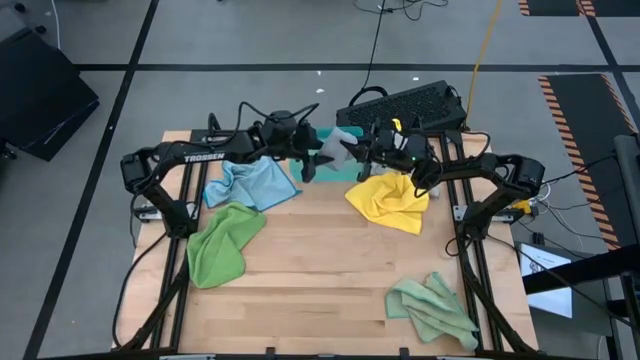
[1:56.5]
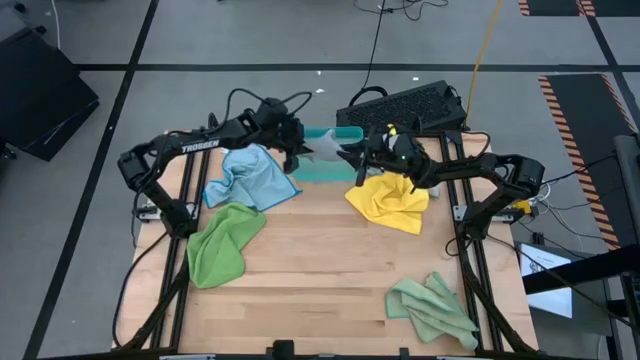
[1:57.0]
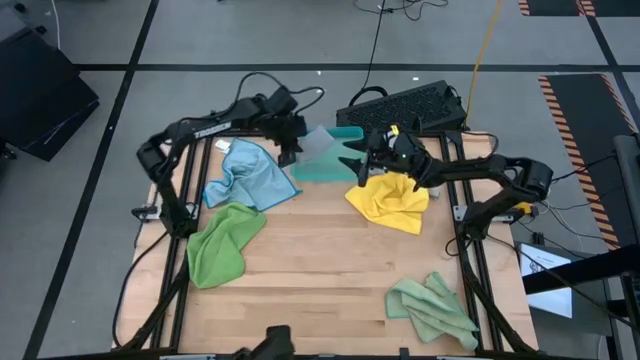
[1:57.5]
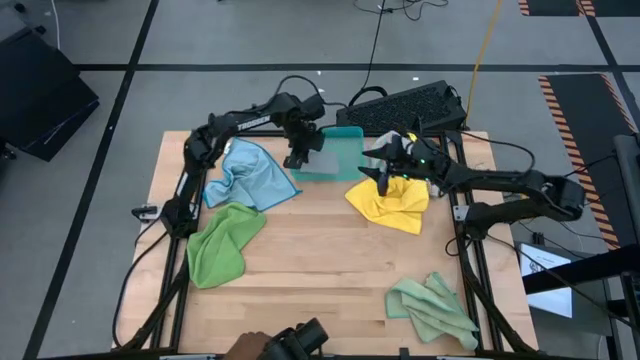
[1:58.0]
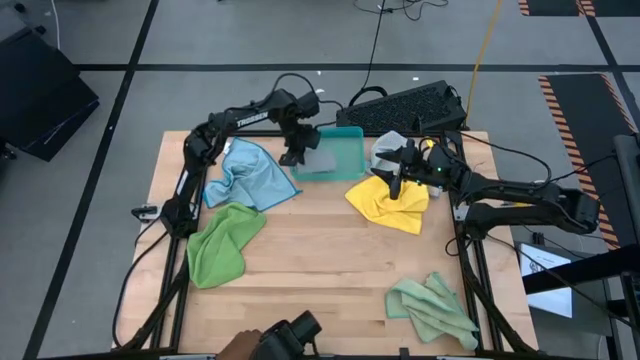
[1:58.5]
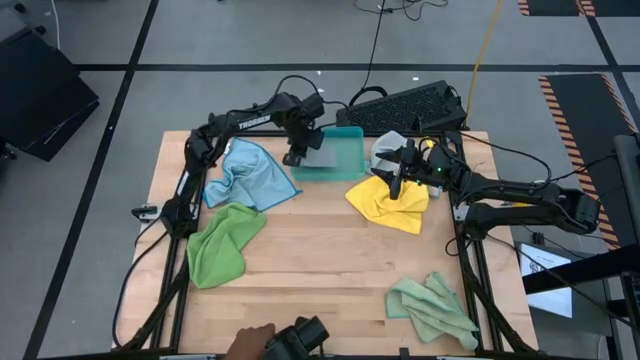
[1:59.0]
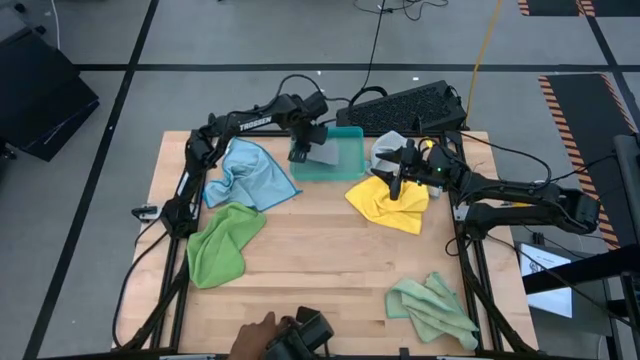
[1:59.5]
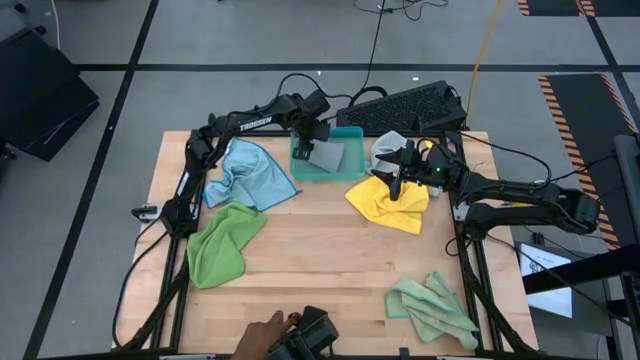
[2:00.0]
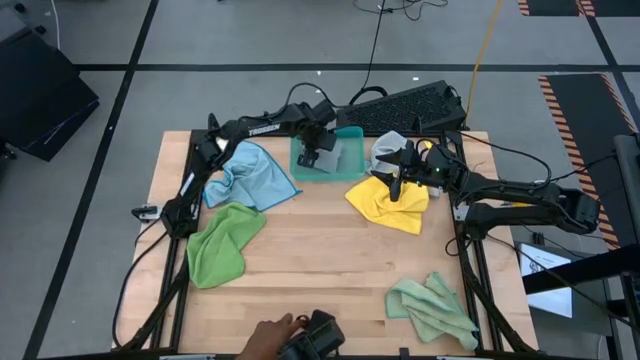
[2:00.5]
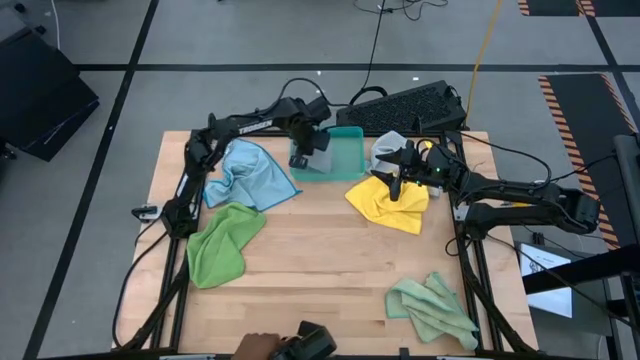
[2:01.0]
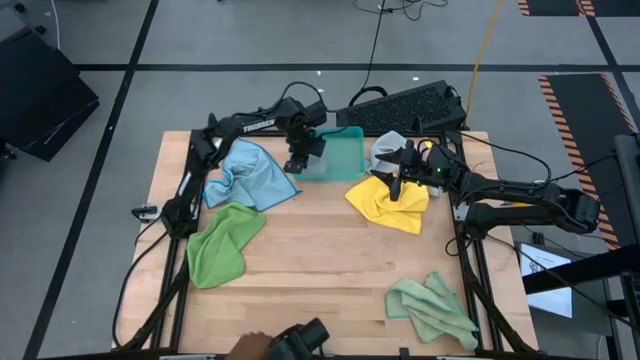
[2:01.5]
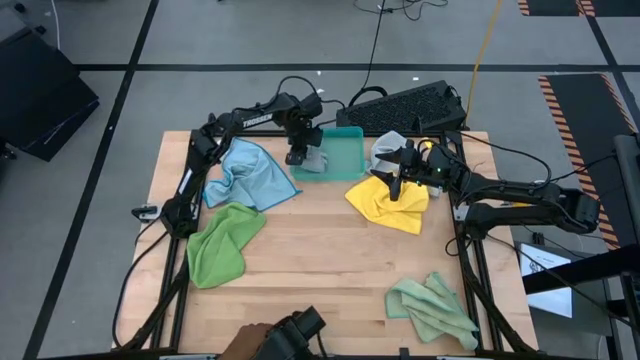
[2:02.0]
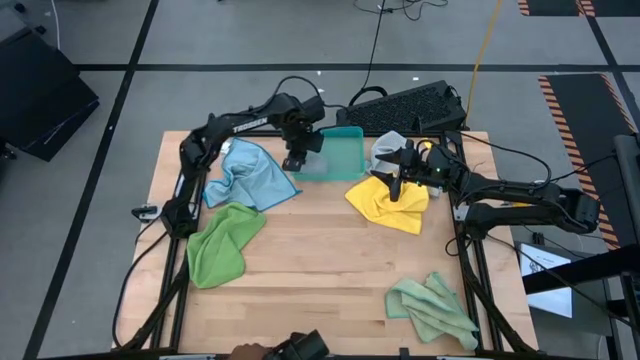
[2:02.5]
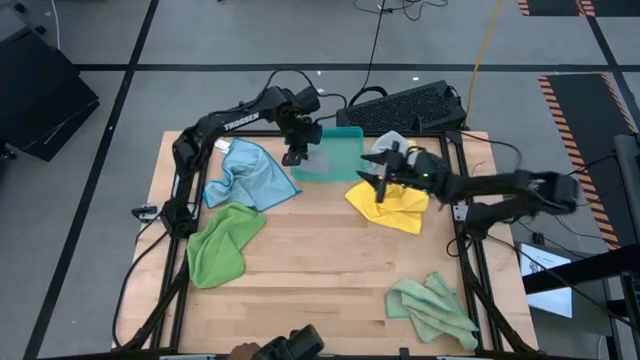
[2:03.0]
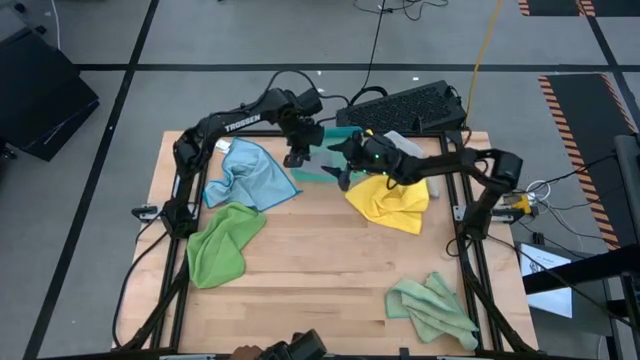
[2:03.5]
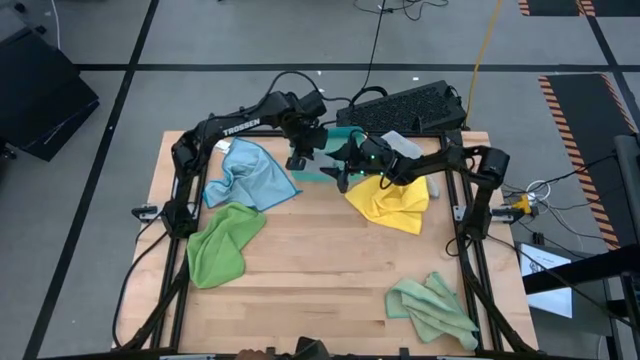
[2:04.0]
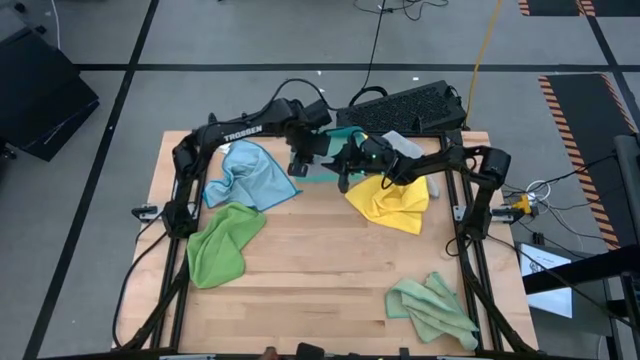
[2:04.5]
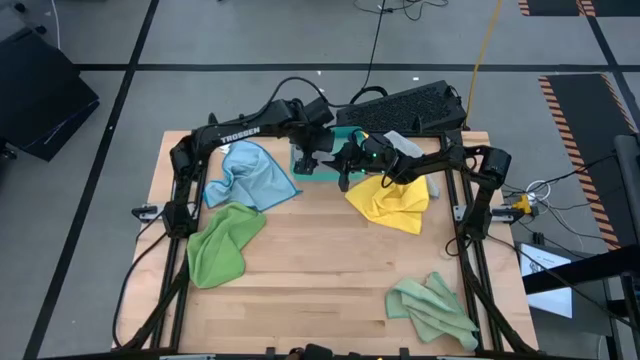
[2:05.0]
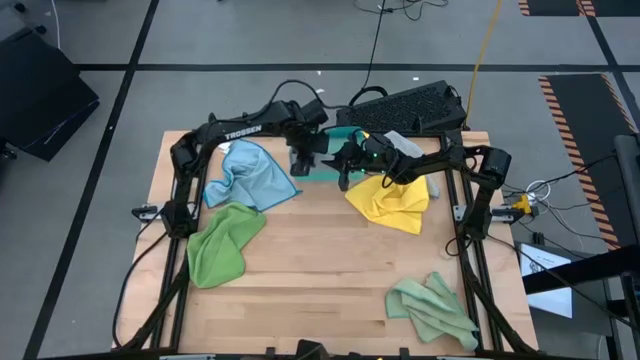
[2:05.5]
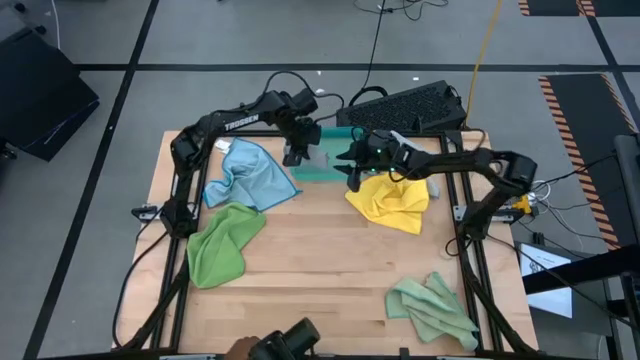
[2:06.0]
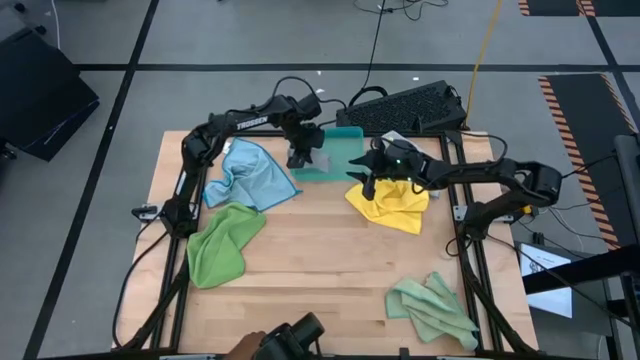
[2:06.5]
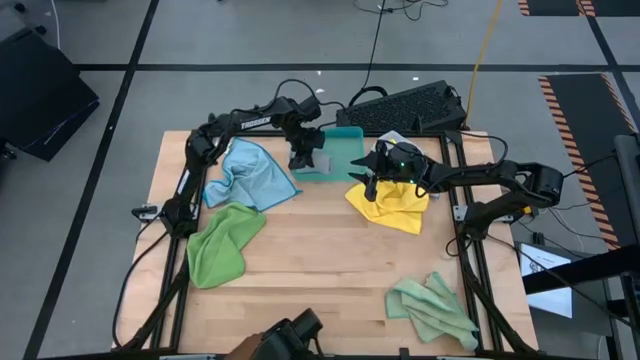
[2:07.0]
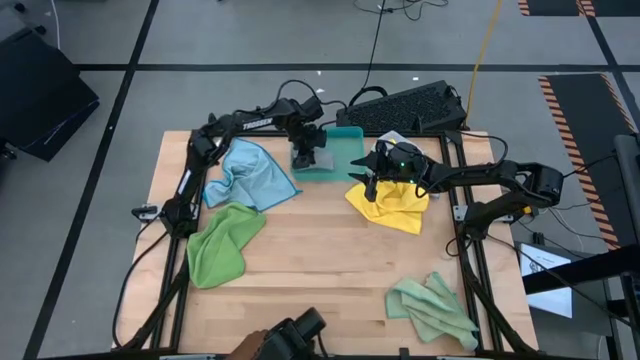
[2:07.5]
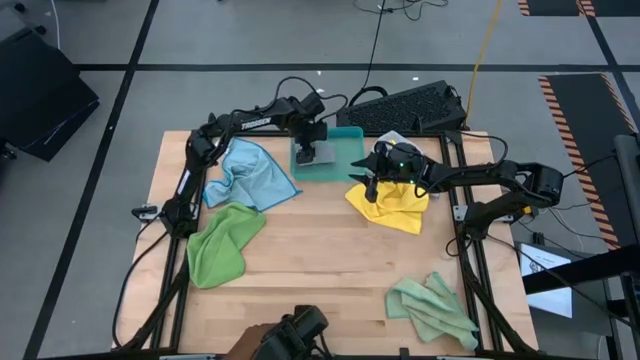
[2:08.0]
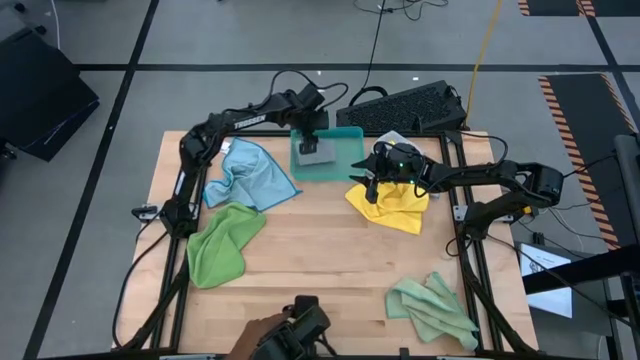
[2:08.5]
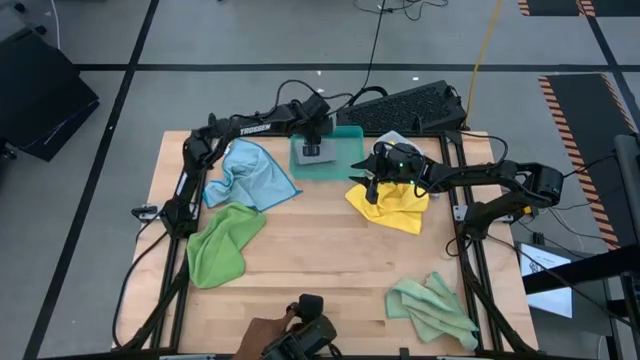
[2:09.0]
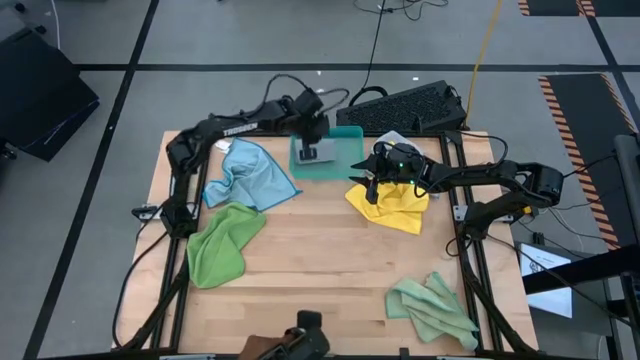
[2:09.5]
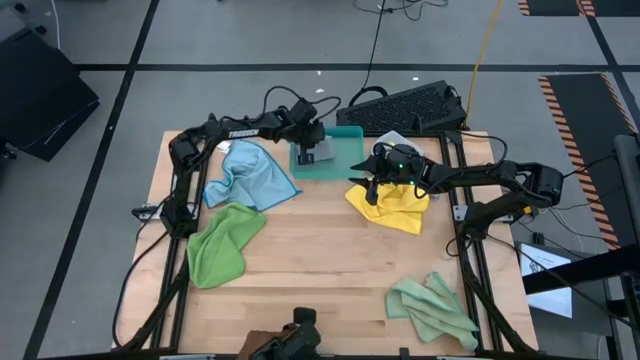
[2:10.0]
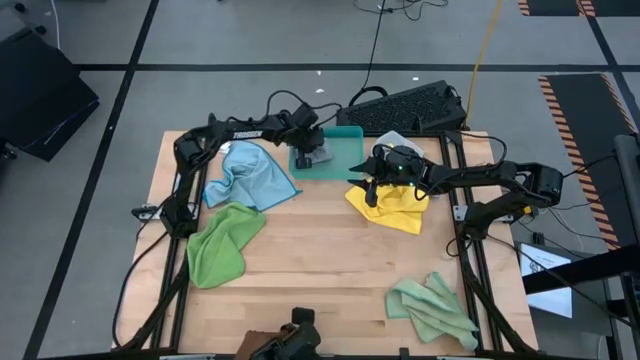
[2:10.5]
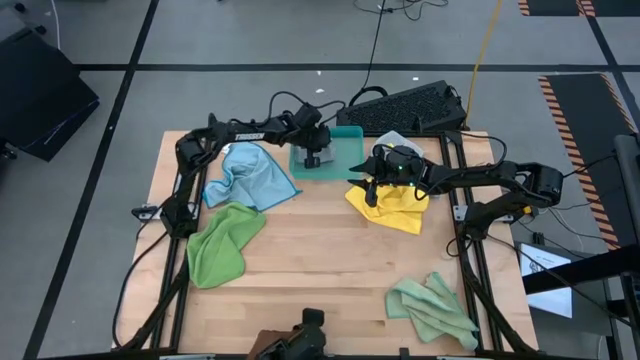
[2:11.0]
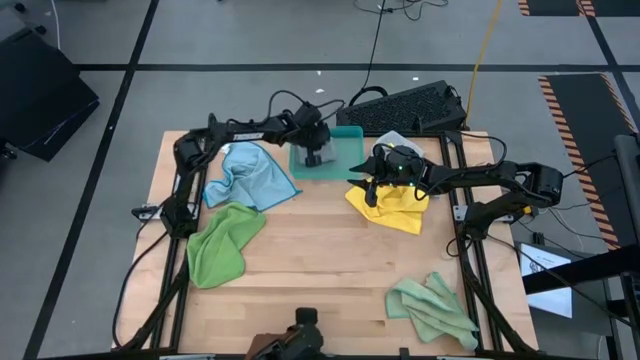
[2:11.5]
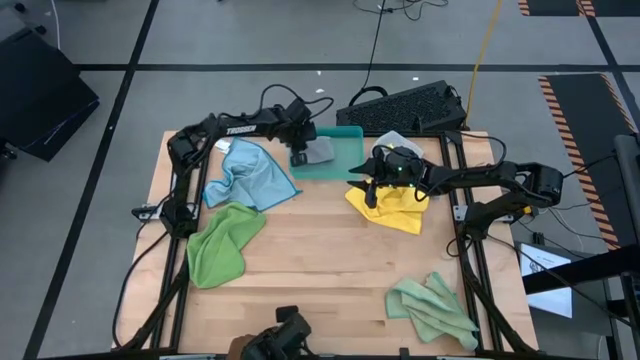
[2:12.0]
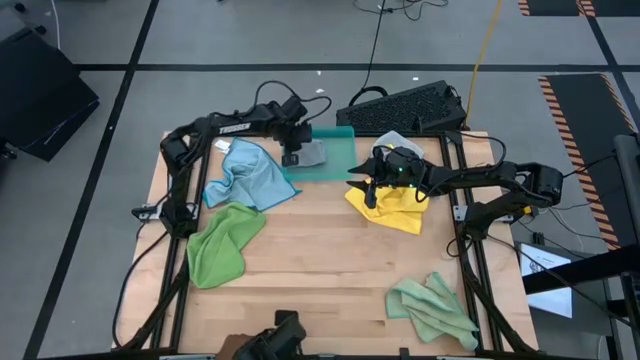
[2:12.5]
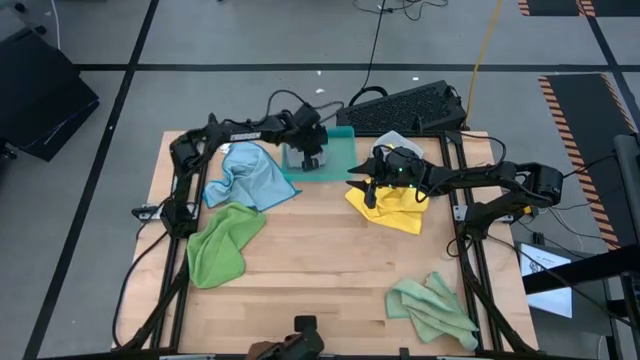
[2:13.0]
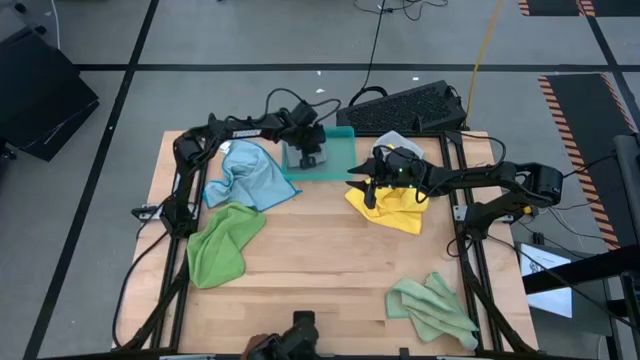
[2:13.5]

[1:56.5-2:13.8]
Task: Fold microfiber towels
Put the folded dark gray microfiber towel into the green bin

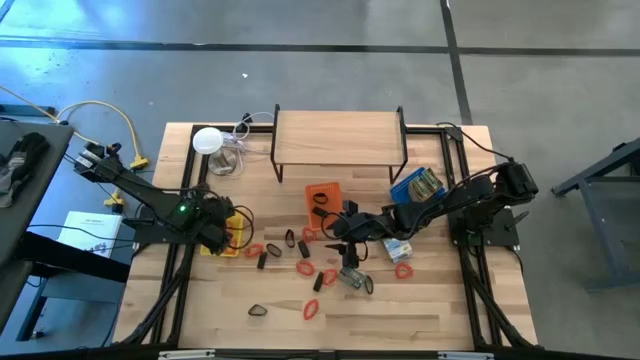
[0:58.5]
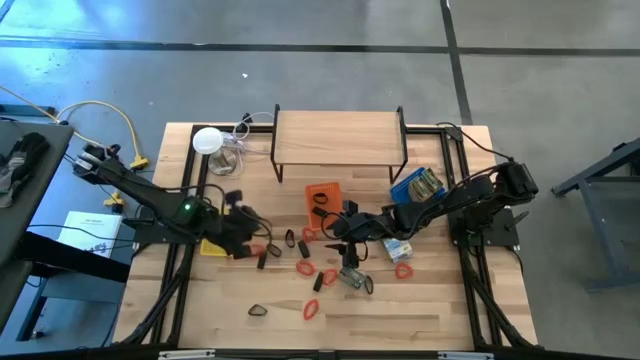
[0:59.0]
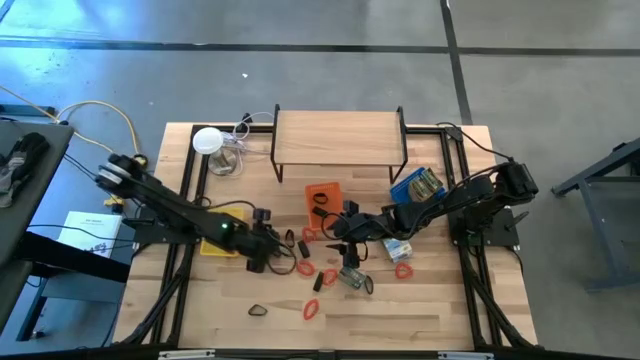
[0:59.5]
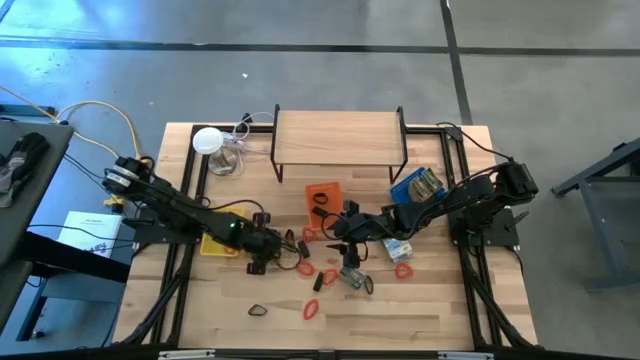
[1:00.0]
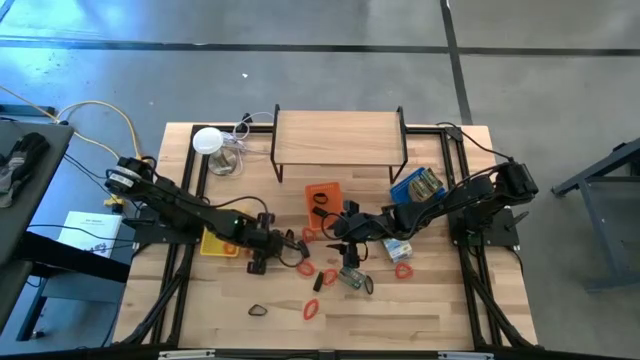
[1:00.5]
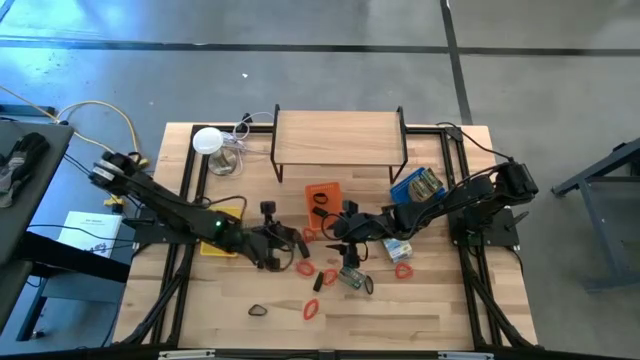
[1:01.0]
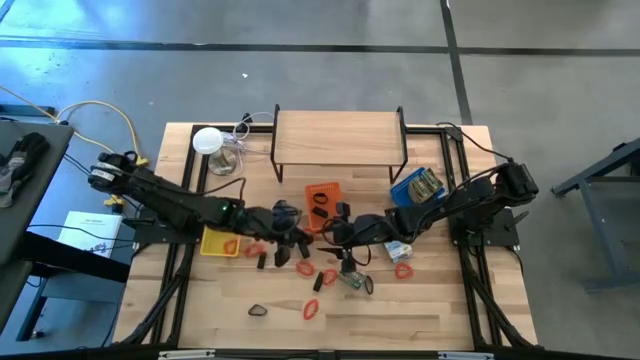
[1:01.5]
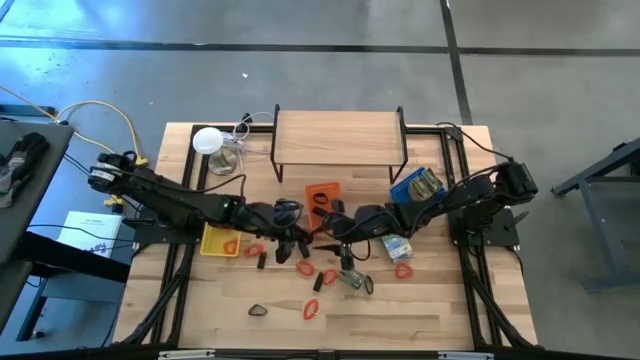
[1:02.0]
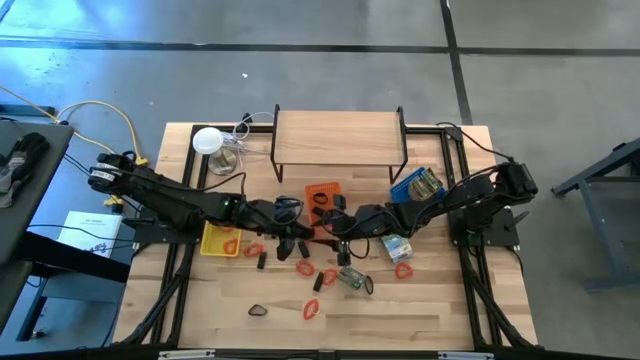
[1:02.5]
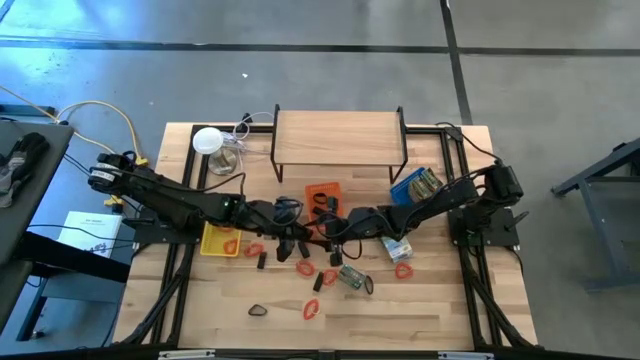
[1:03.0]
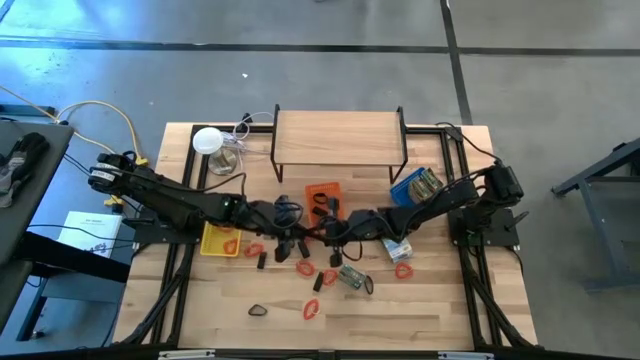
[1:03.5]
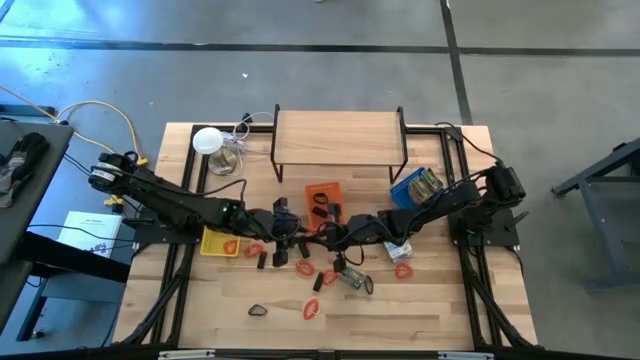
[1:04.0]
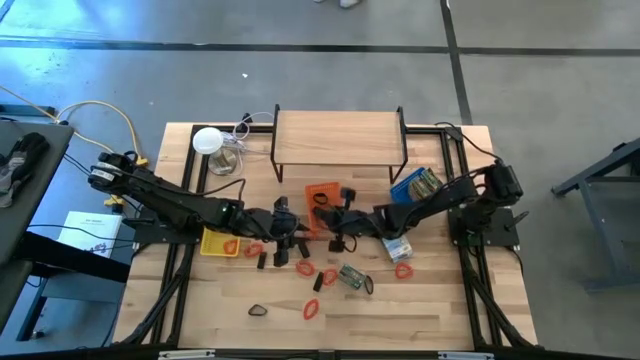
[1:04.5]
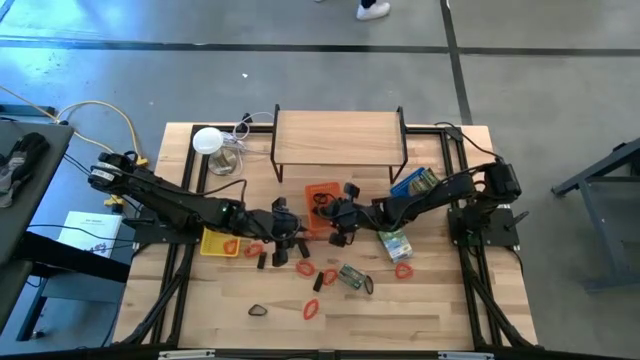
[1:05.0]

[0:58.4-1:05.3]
Task: Pick & Place Office Desk Supplies
Put the black rubber band into the orange bin
